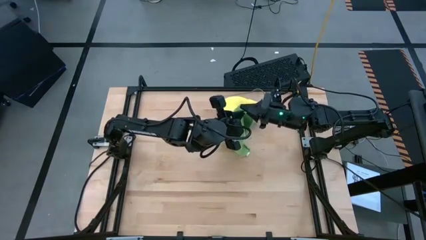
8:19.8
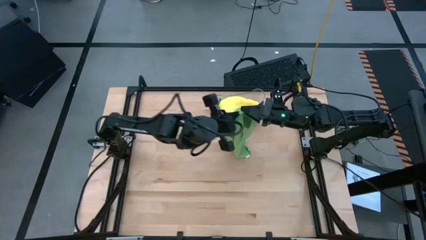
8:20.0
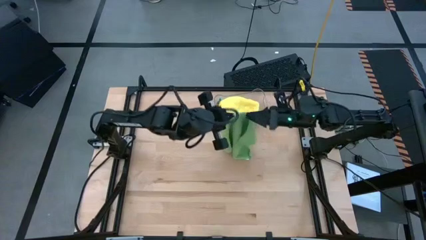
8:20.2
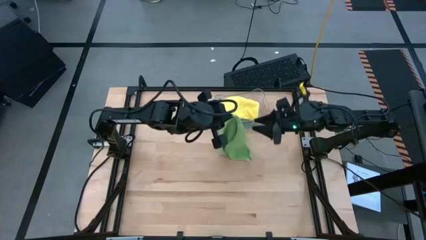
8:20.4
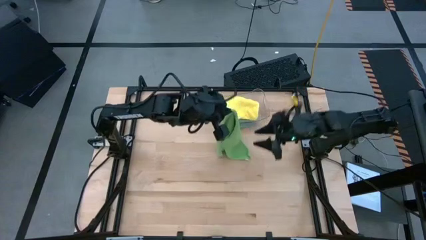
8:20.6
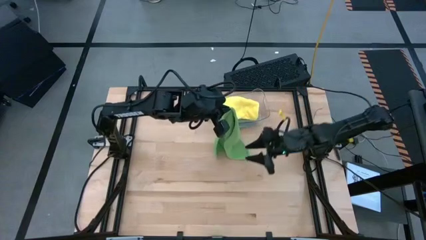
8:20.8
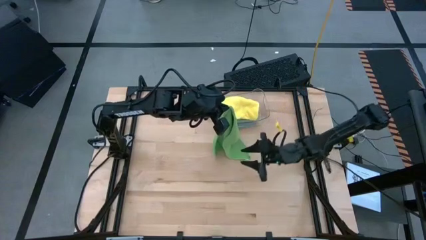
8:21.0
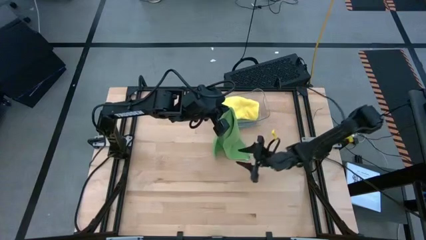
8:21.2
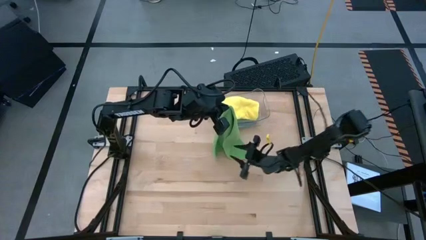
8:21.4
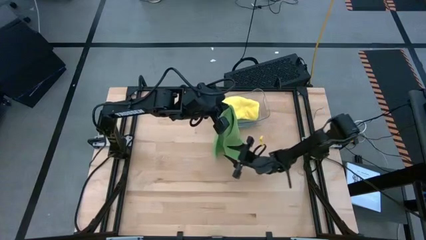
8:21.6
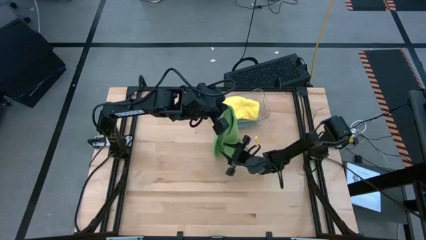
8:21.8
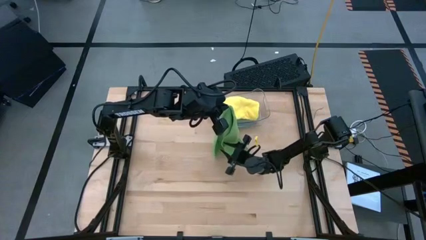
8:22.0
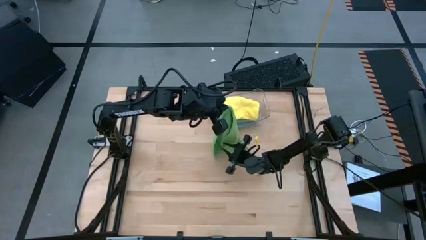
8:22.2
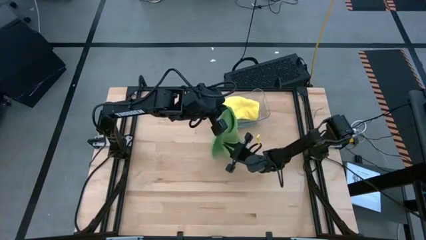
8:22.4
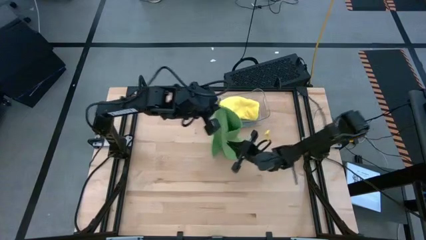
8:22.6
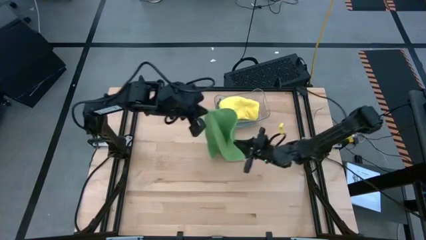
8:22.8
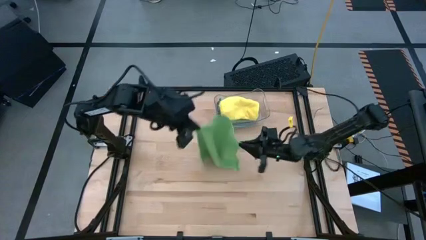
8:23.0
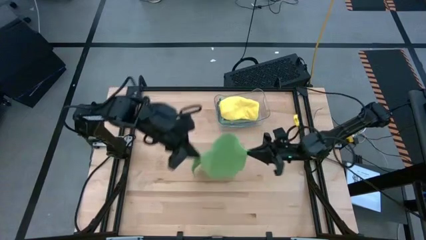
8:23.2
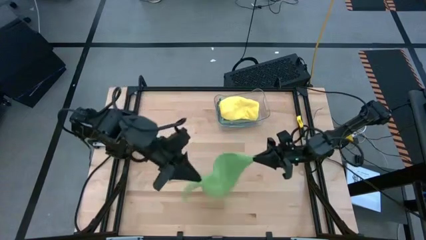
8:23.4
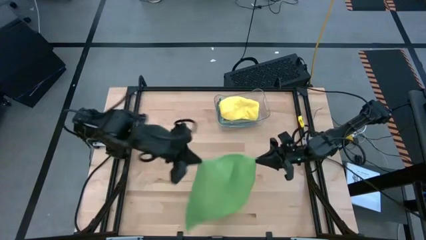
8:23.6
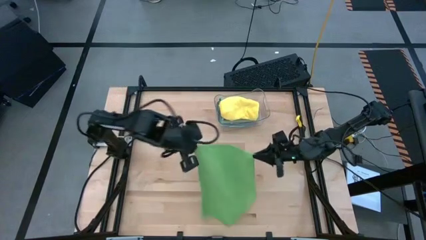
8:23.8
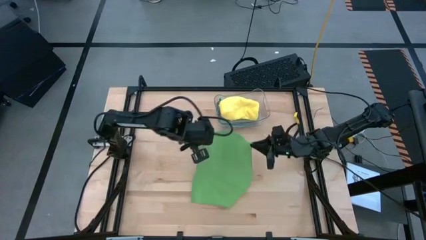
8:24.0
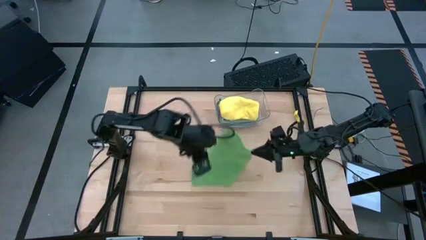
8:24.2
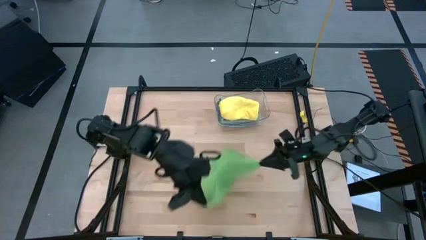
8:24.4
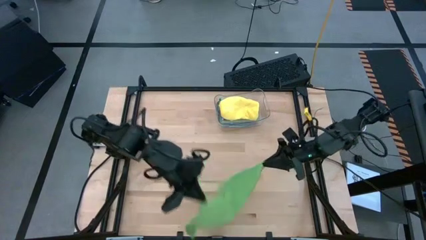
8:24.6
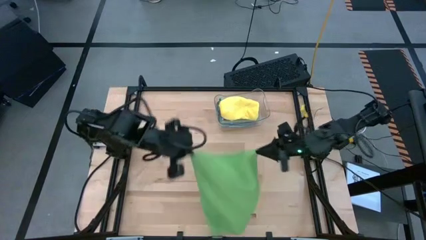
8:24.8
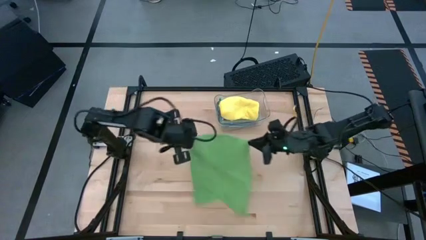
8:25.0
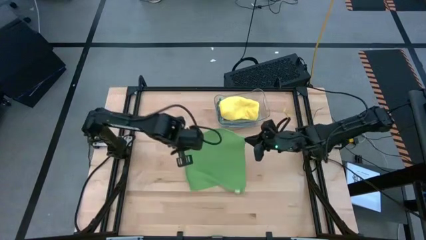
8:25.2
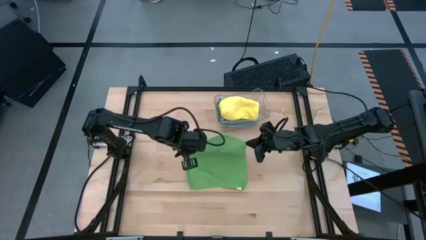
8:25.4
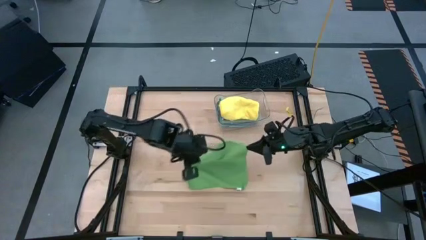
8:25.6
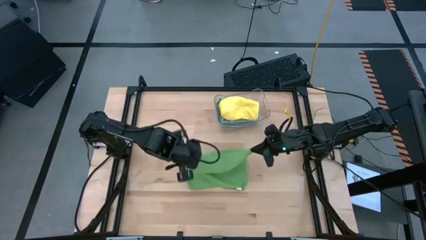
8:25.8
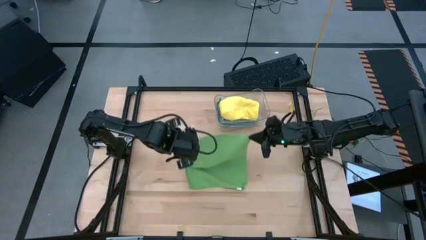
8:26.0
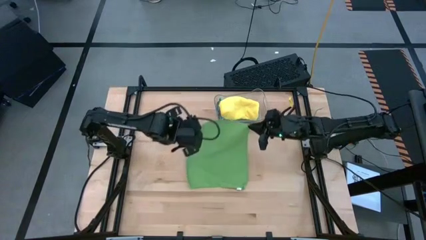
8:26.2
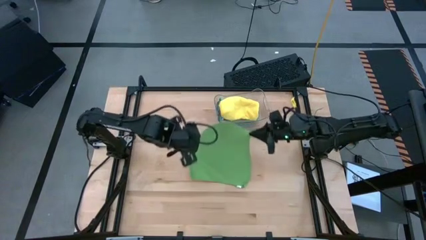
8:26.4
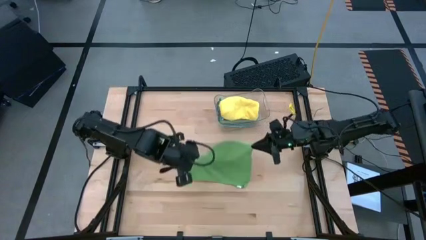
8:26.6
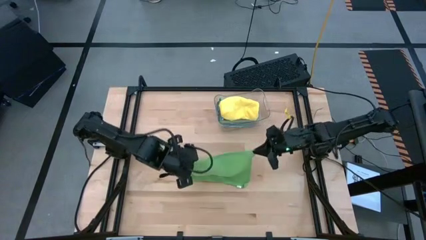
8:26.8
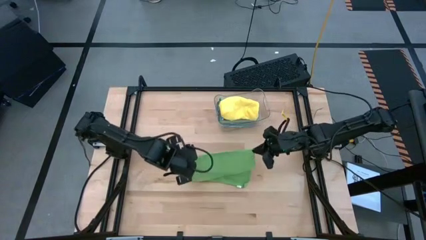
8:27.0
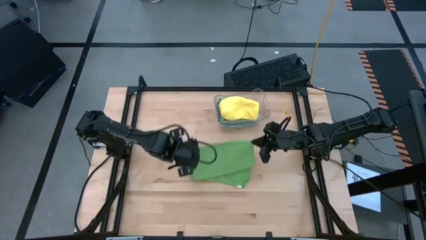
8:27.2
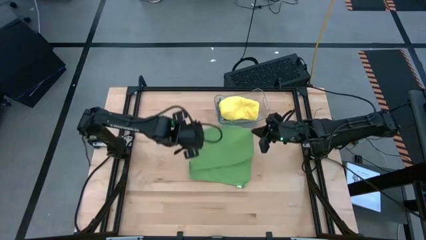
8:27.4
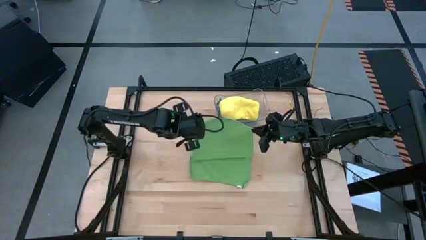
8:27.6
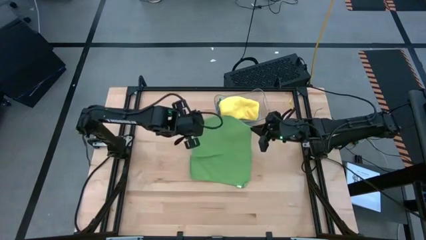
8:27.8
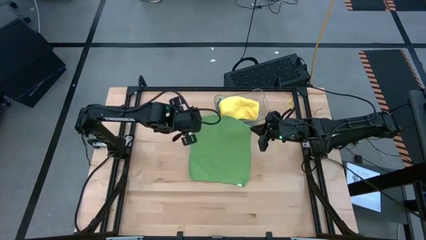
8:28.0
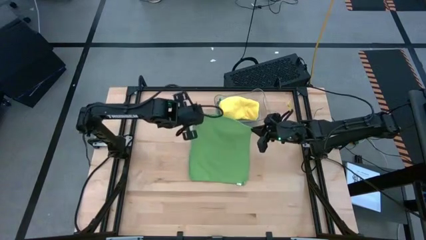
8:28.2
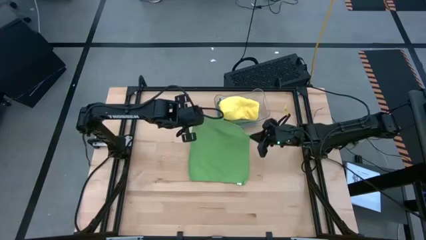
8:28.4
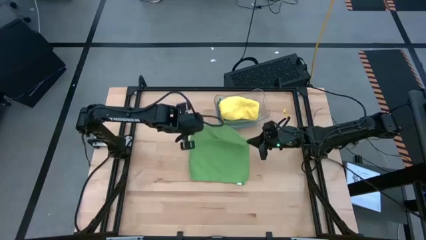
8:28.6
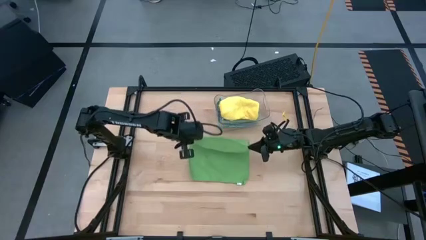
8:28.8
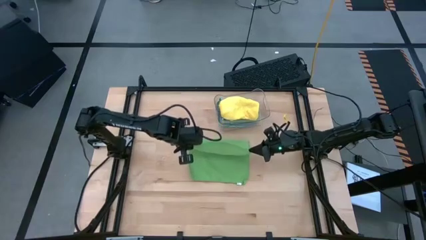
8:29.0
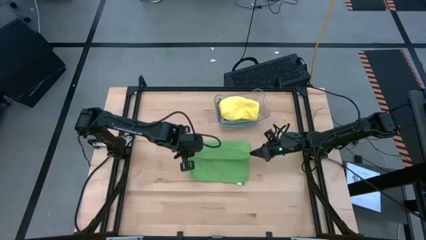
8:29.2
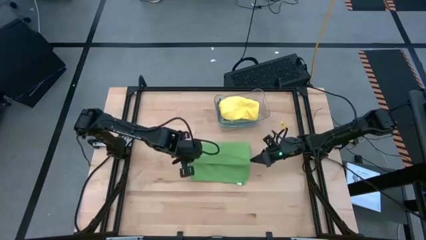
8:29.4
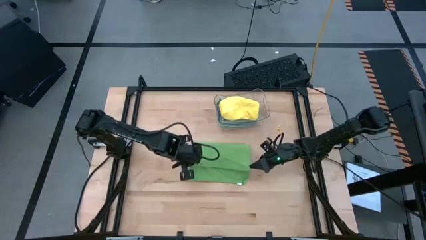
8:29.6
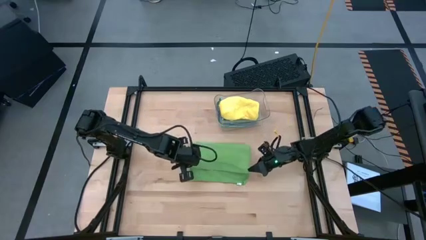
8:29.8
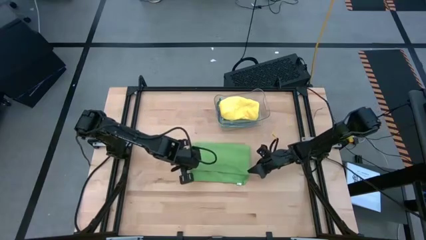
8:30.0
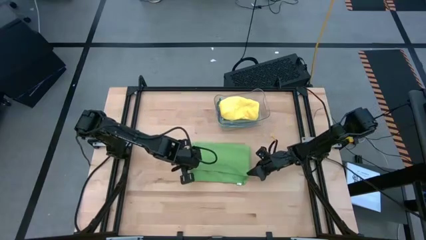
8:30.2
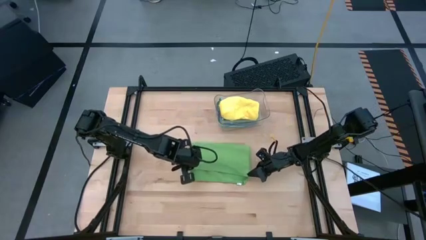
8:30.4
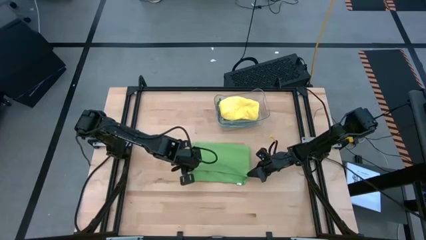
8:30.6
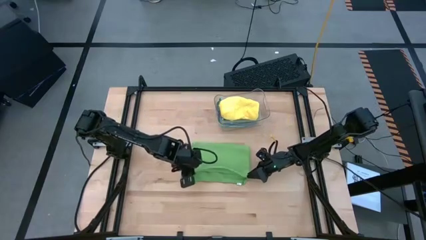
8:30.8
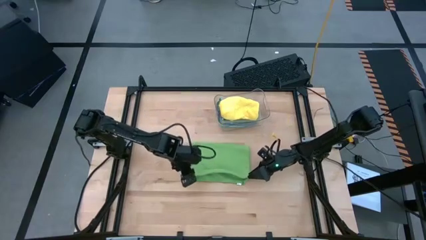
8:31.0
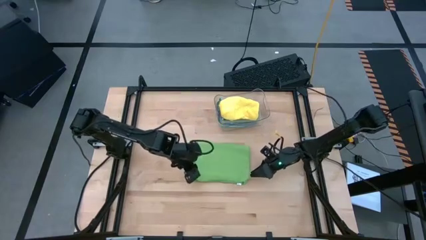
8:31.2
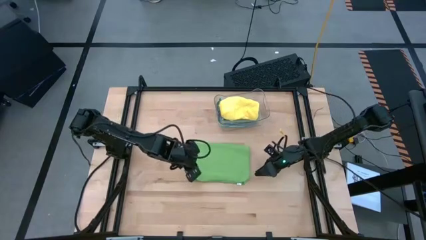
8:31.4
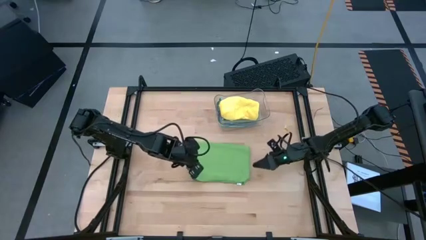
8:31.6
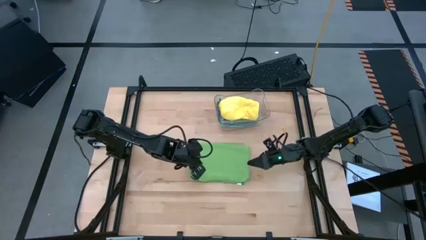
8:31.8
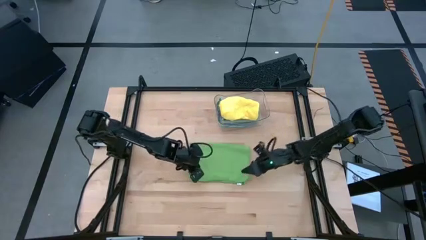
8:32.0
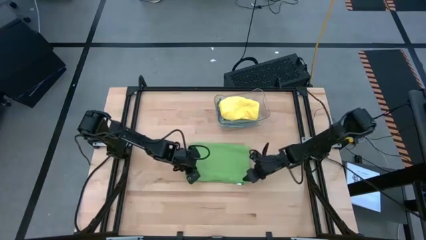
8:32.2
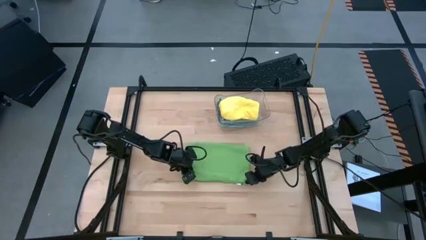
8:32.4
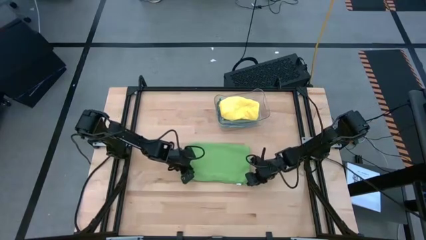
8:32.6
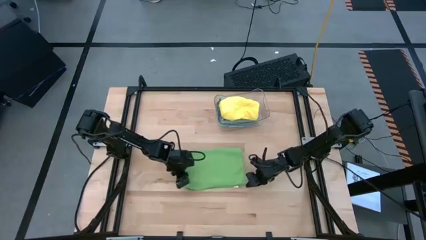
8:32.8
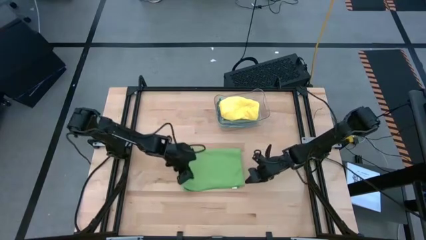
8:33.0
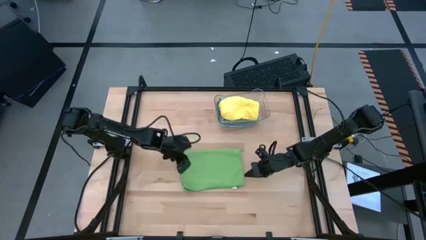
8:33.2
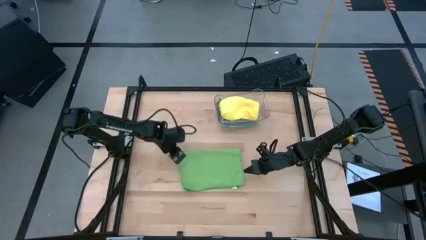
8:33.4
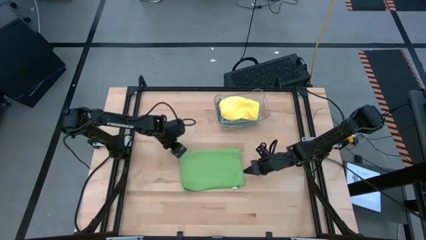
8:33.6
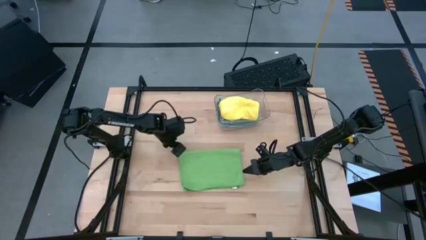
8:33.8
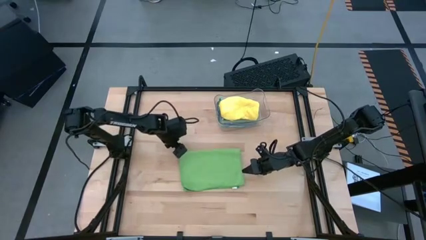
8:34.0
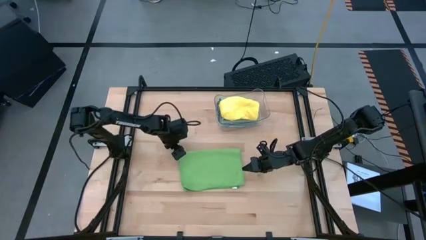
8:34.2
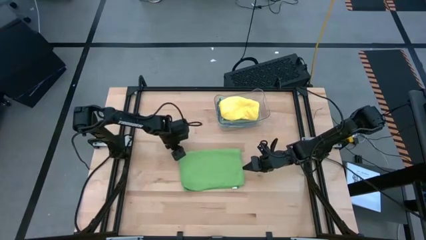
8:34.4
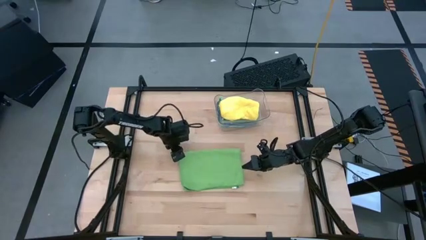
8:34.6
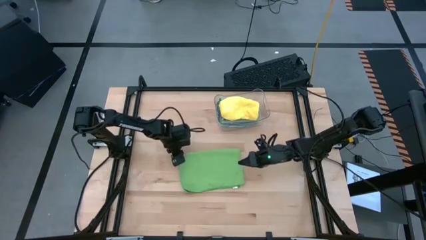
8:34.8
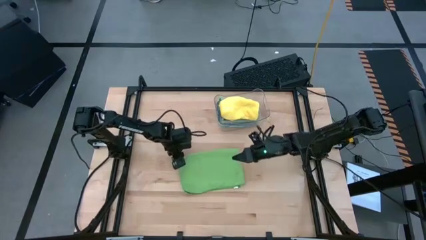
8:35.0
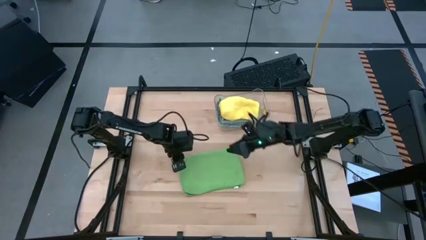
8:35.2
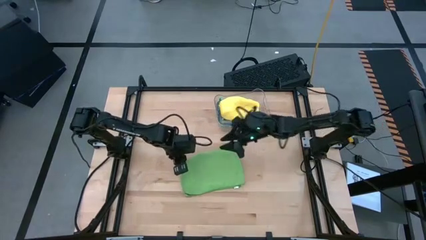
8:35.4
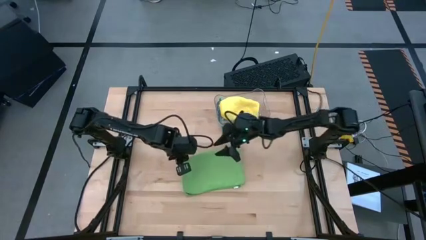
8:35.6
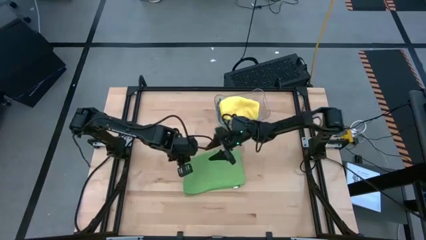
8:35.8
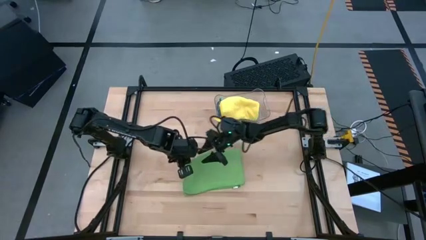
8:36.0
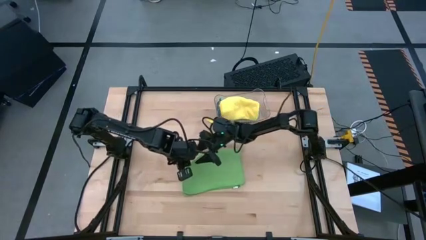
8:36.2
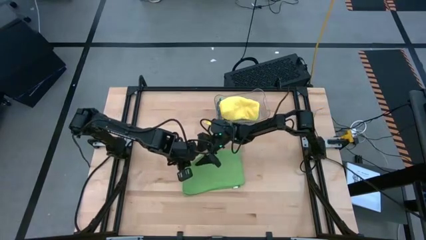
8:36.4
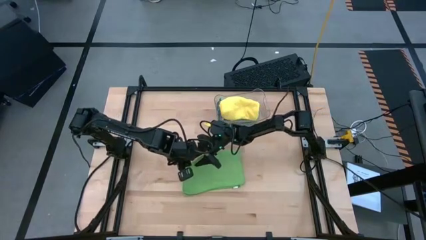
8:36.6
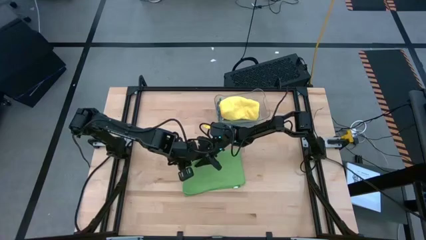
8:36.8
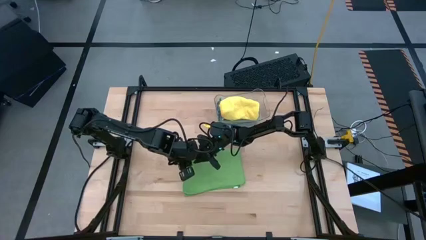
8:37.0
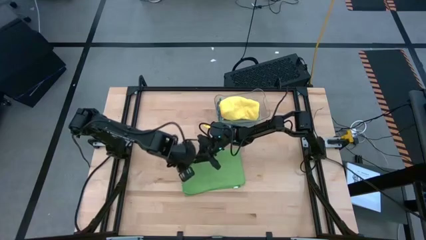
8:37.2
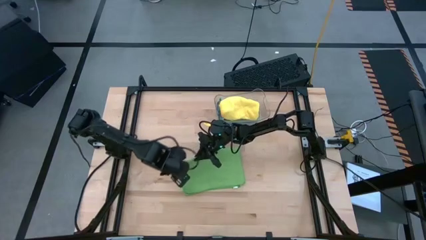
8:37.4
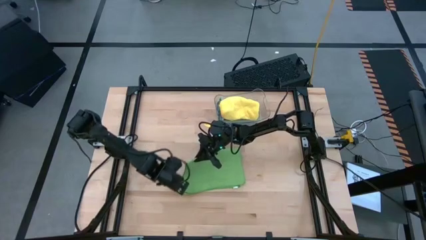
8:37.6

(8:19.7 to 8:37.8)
Task: Fold microfiber towels
Fold the green towel
